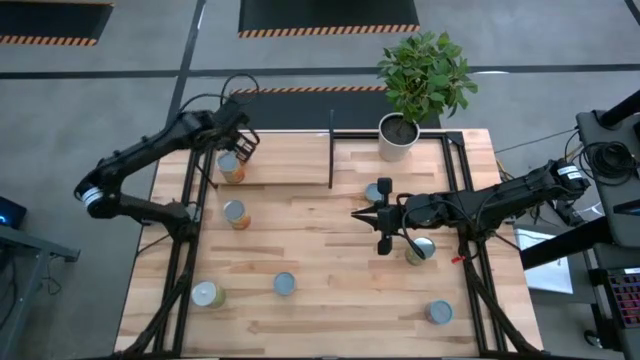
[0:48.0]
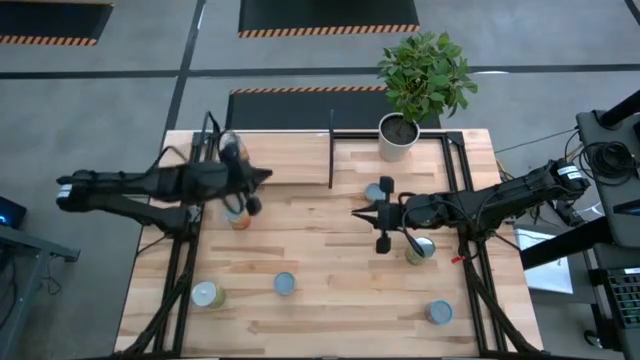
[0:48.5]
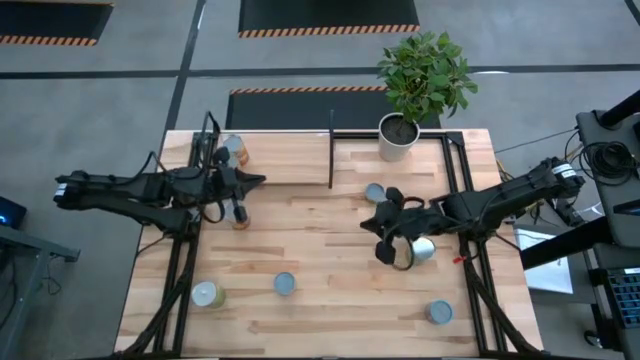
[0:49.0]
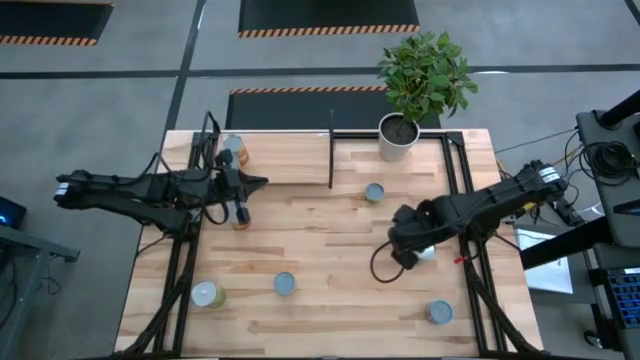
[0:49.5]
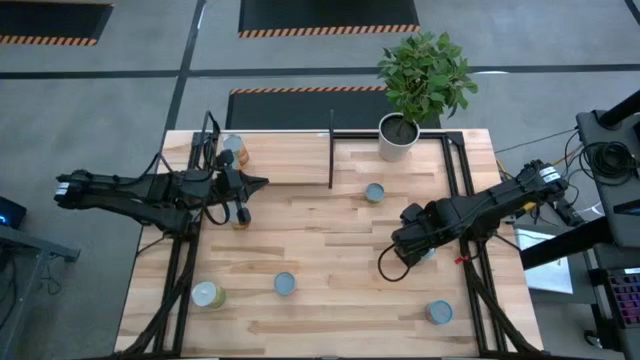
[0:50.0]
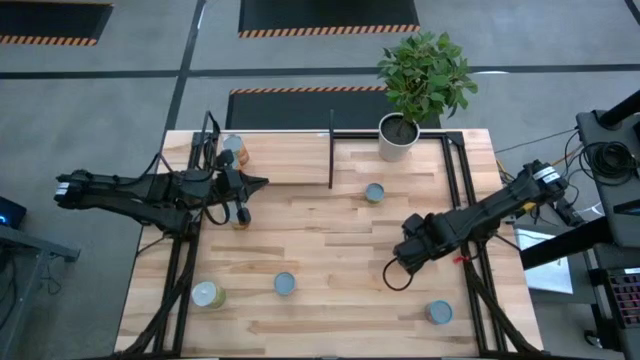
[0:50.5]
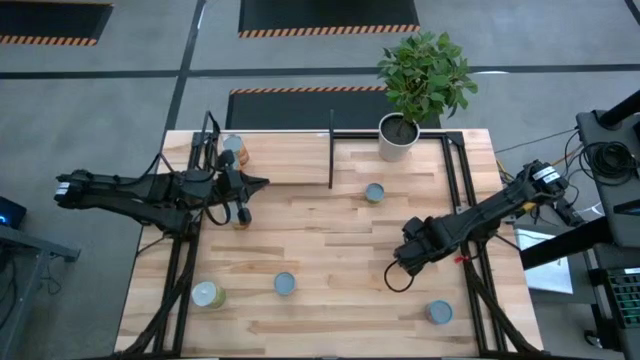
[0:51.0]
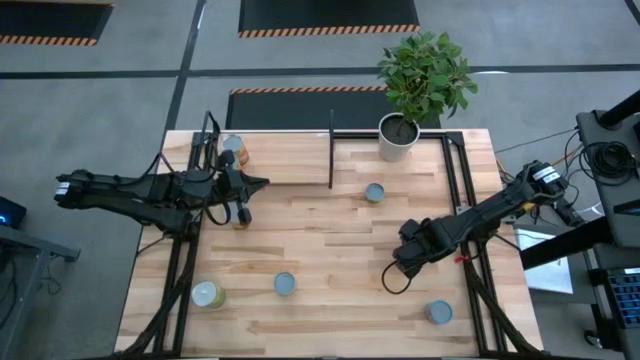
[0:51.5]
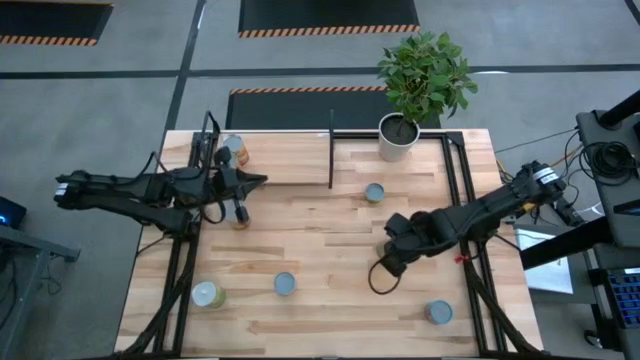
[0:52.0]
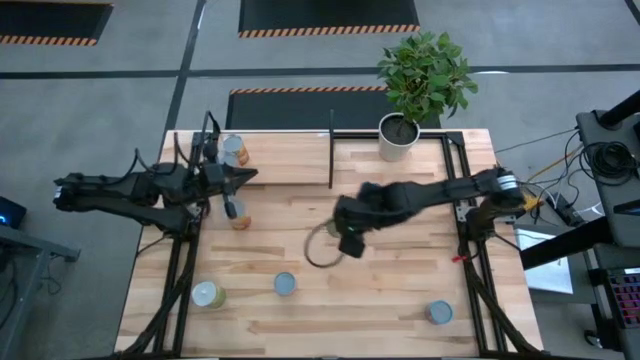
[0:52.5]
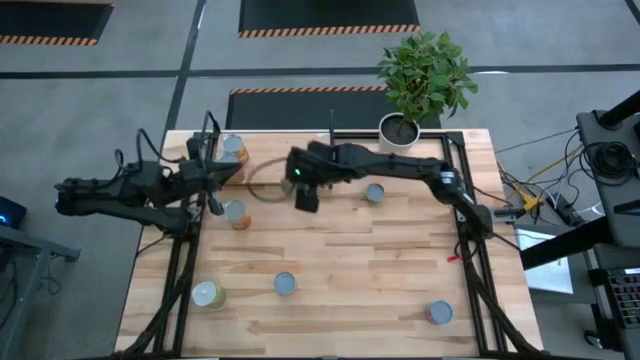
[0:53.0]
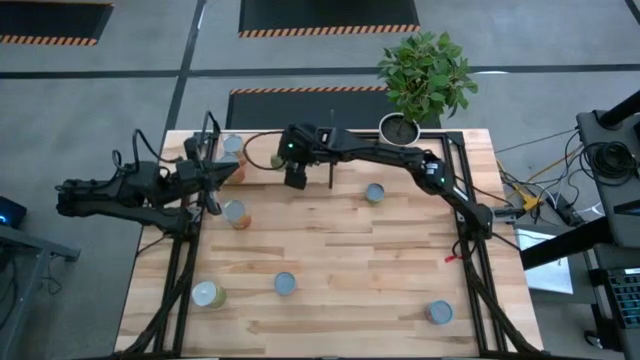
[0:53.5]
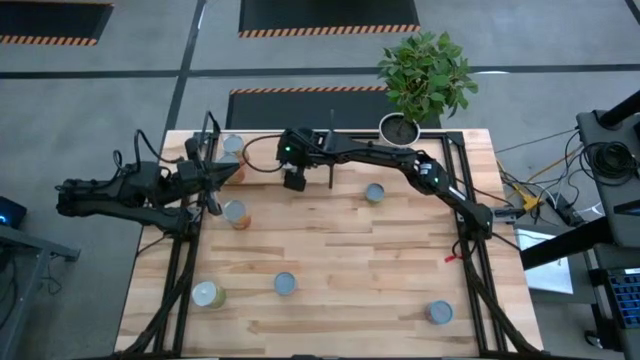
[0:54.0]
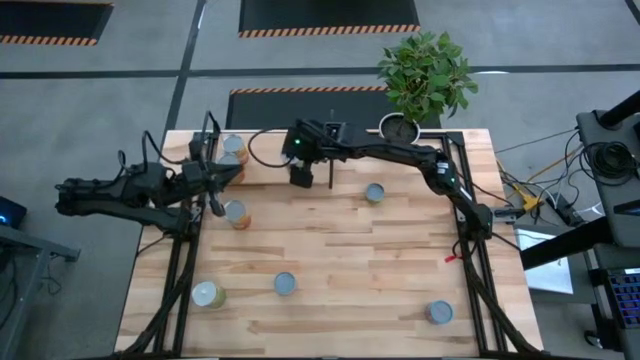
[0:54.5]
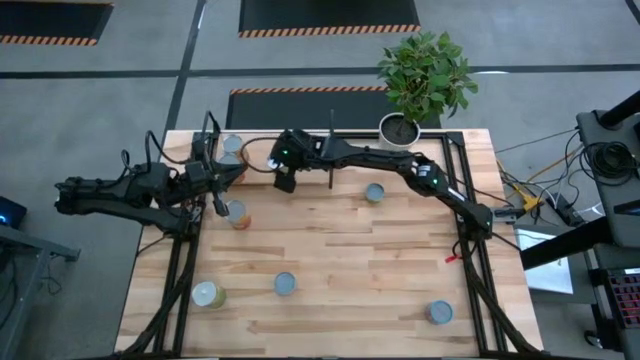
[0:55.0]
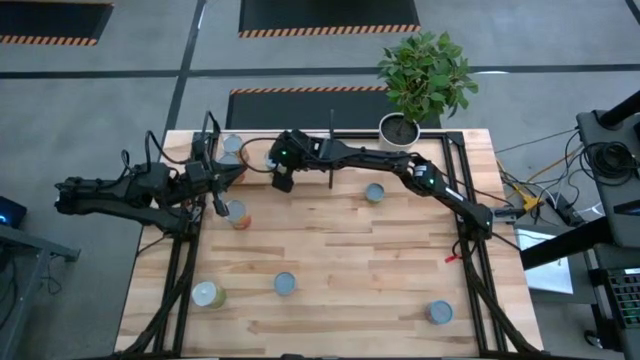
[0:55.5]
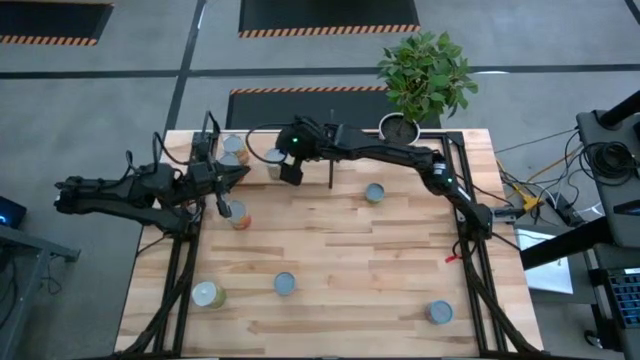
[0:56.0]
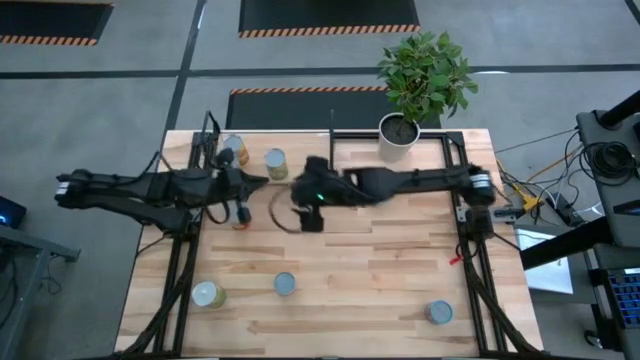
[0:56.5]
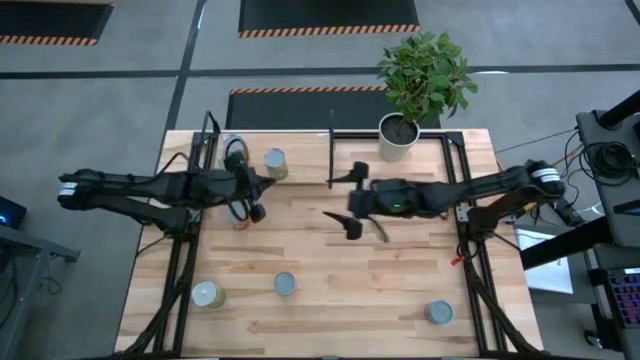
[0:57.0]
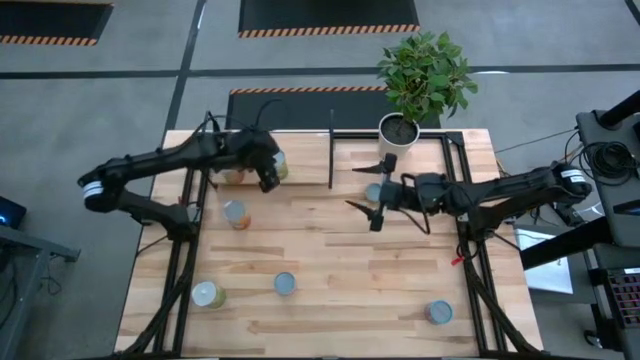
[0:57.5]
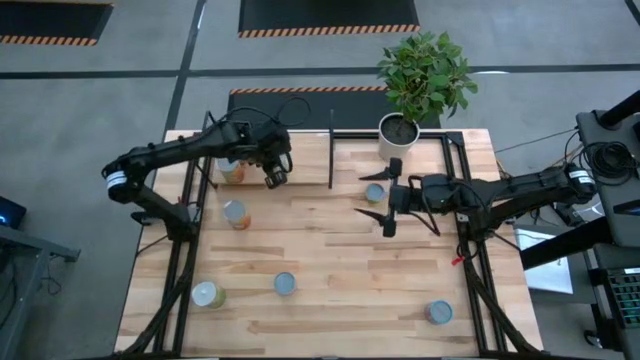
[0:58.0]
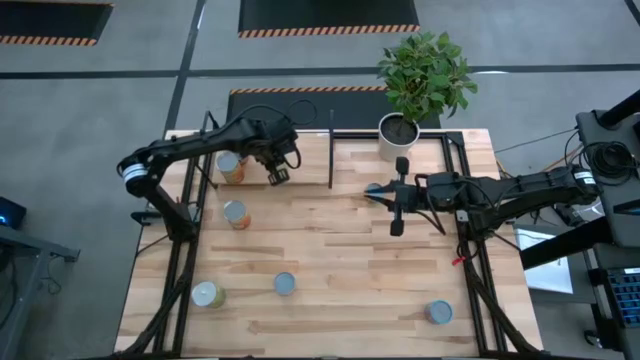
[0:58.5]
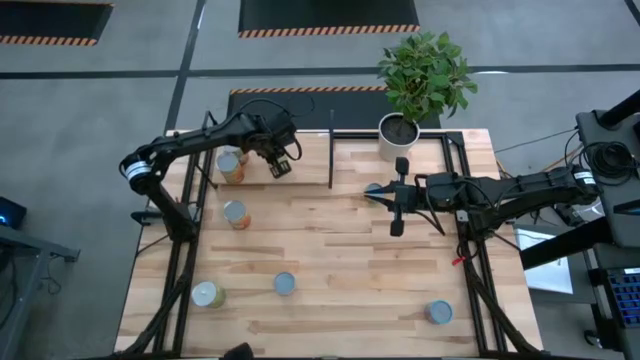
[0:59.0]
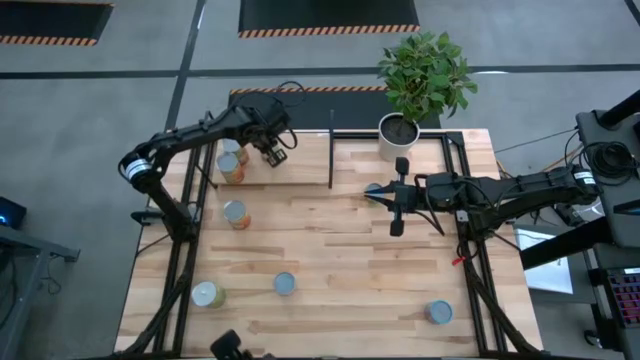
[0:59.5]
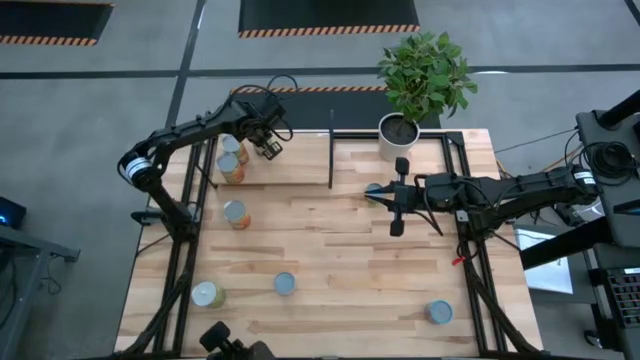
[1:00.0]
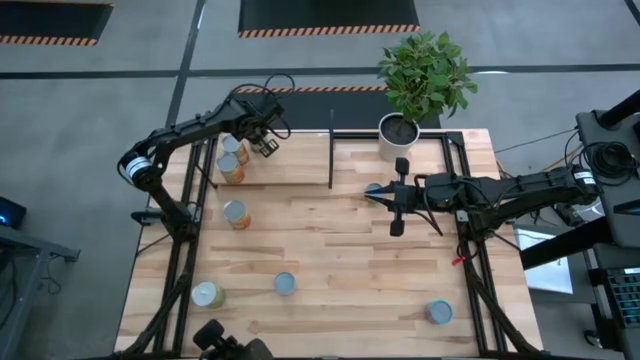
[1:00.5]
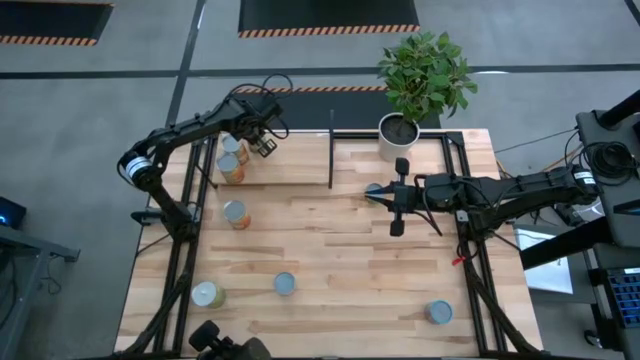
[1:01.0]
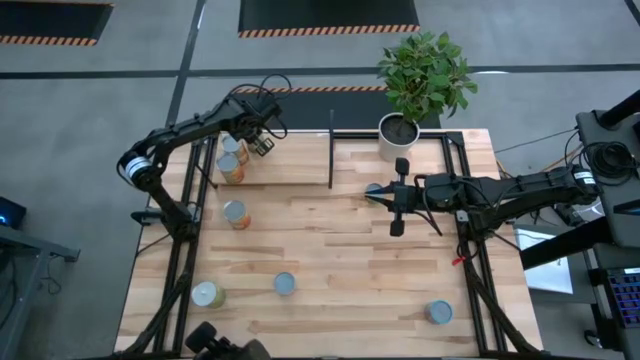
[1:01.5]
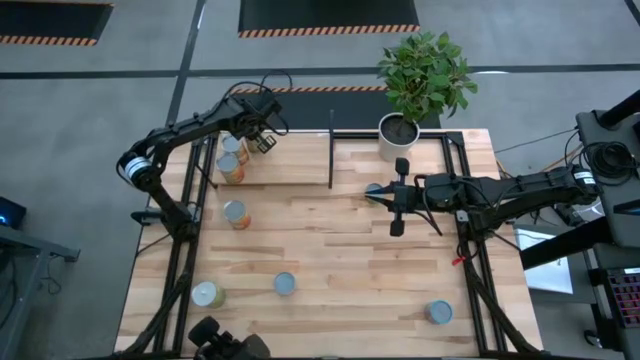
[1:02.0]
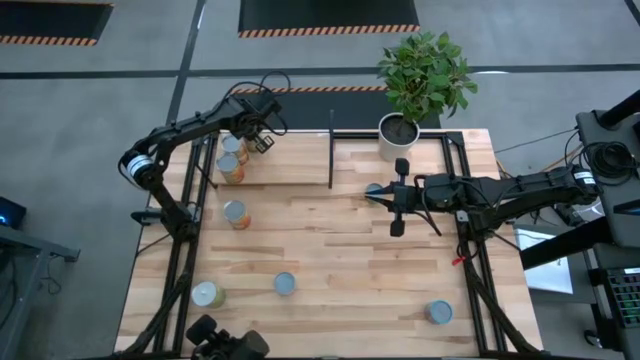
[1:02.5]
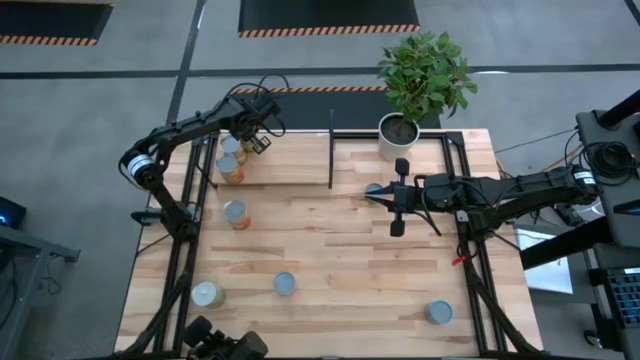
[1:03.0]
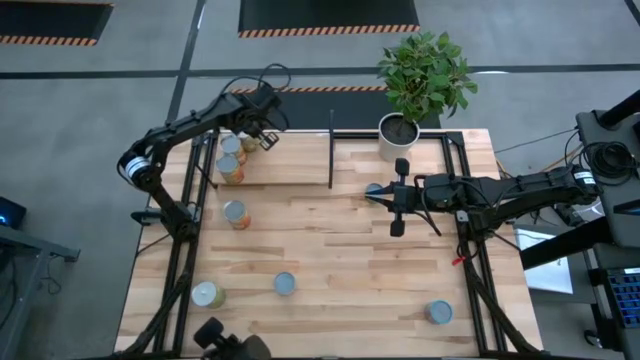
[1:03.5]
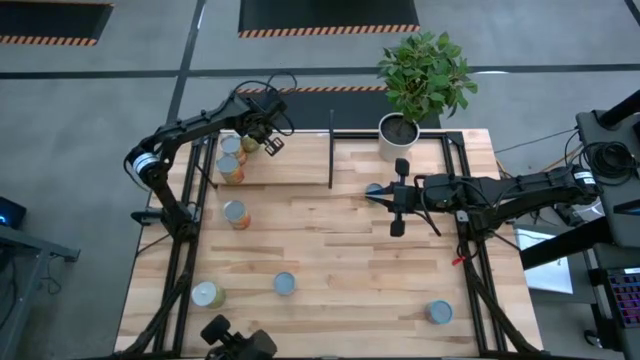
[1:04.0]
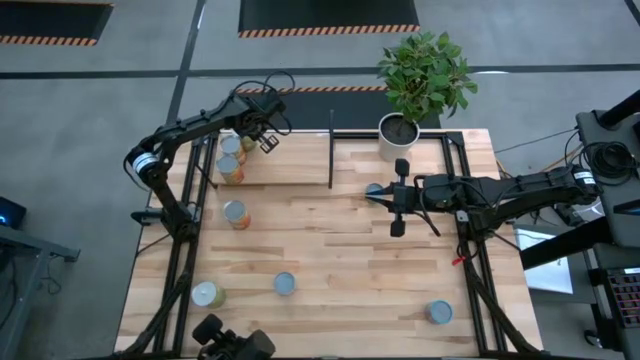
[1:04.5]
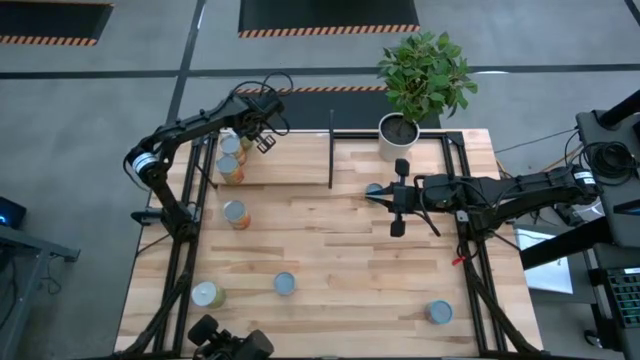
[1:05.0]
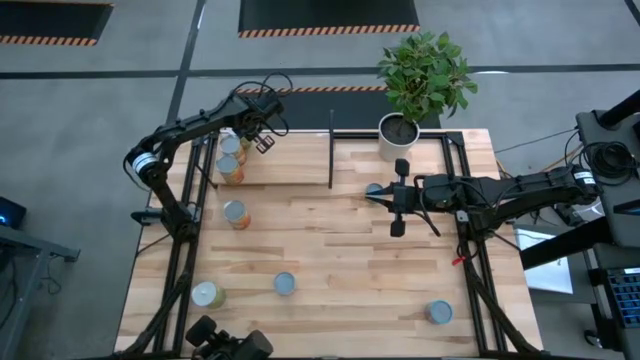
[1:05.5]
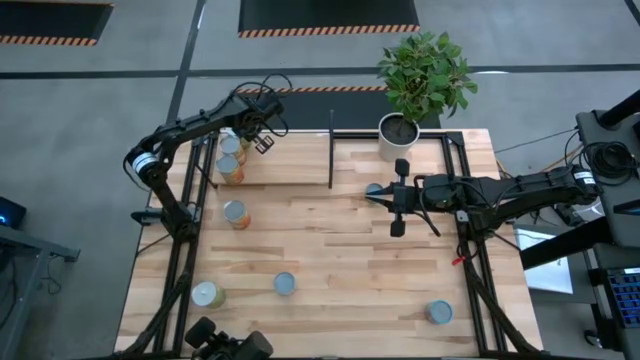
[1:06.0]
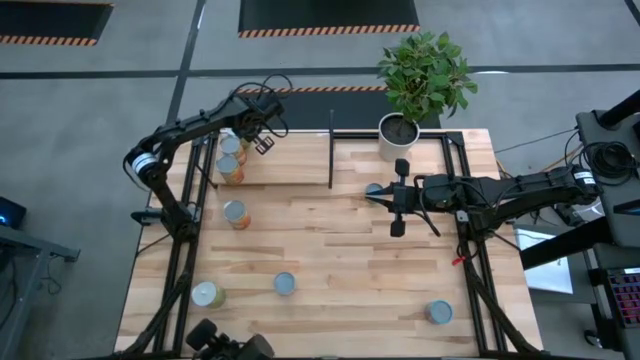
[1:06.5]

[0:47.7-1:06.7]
Task: Pick and place cans onto a shelf
Put the green pears can on the shelf

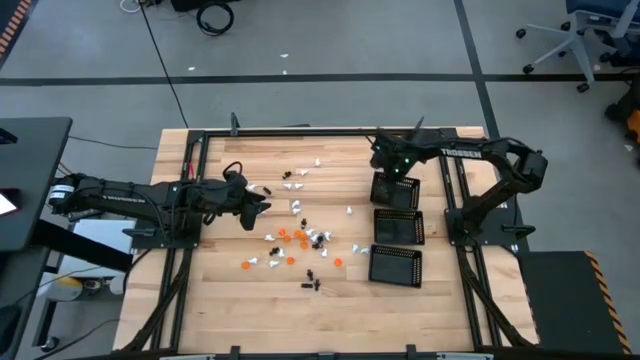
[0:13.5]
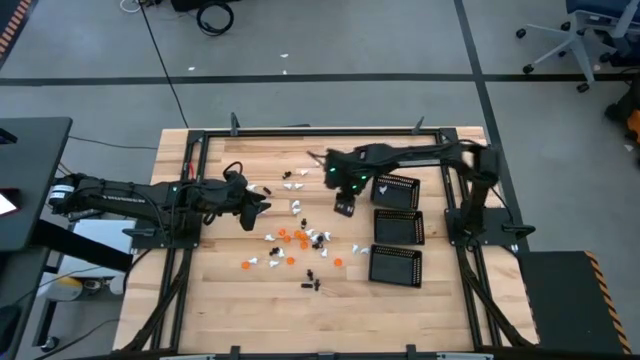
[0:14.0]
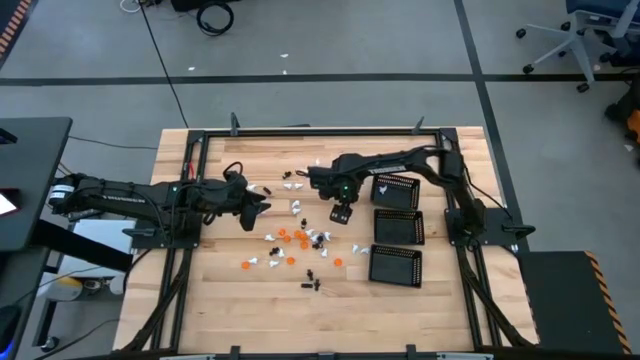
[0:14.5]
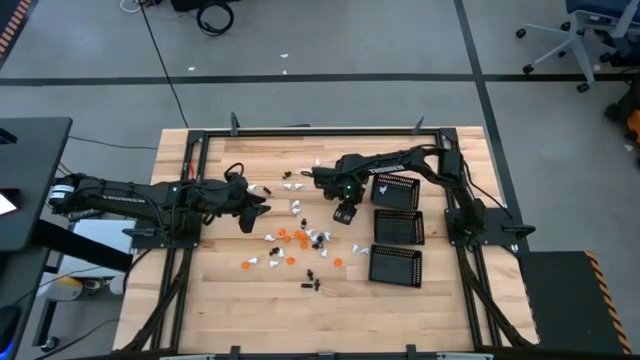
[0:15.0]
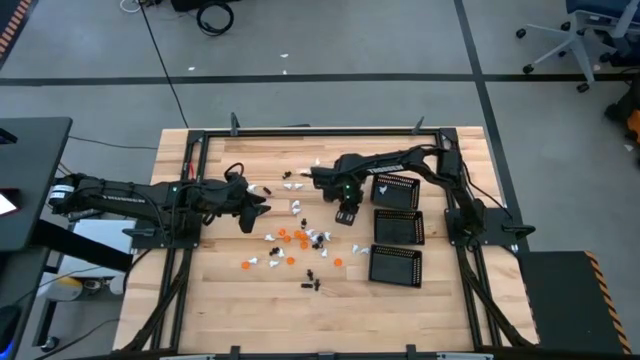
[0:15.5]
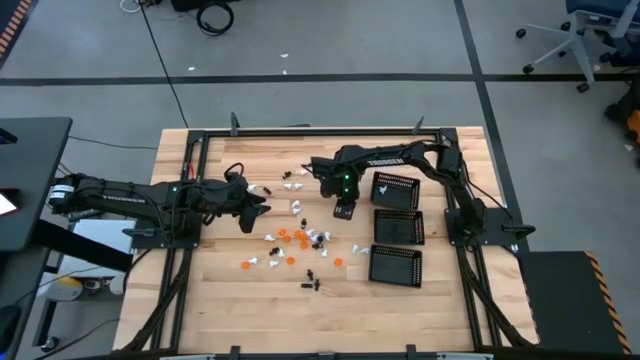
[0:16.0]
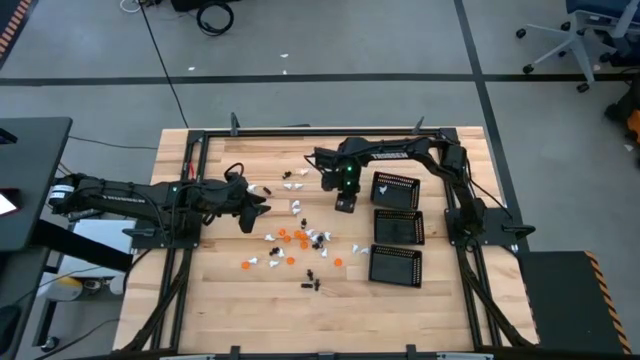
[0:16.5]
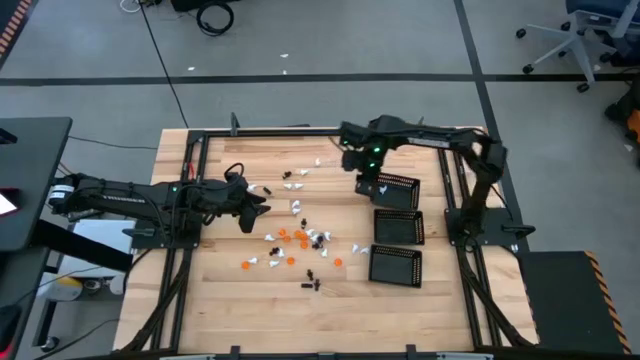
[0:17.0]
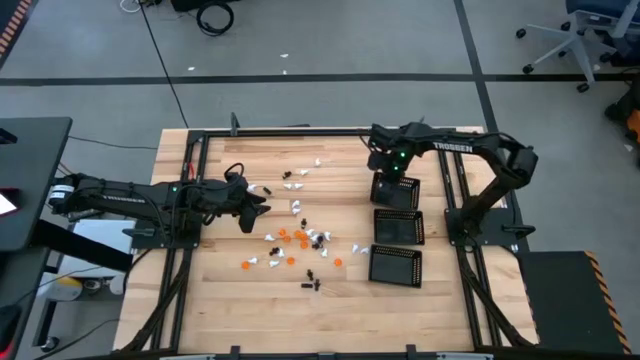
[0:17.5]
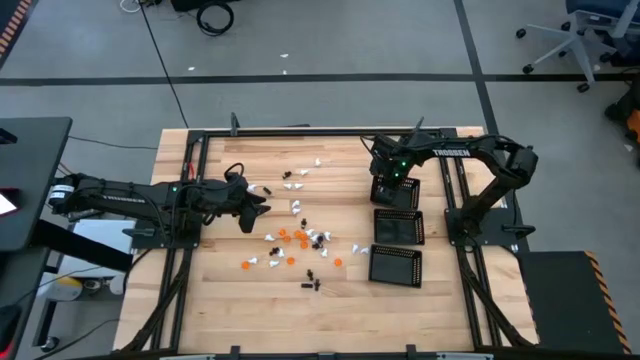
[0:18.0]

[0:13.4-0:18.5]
Task: Sort Halloween decoration
Put the white ghost toy into the top black bin
